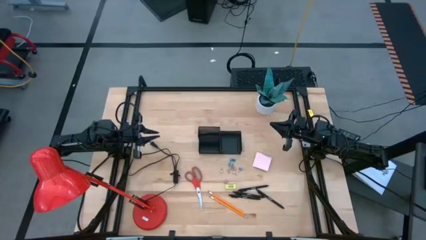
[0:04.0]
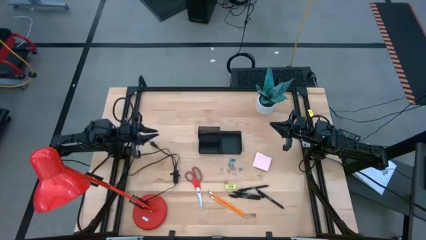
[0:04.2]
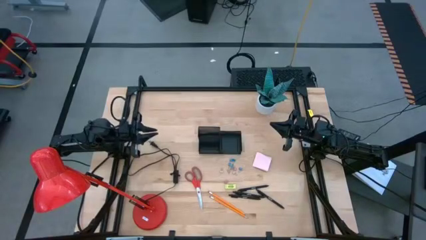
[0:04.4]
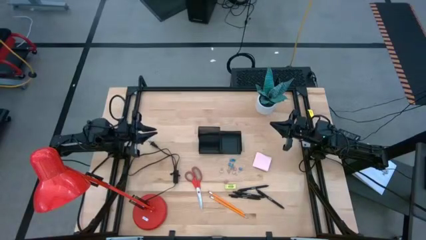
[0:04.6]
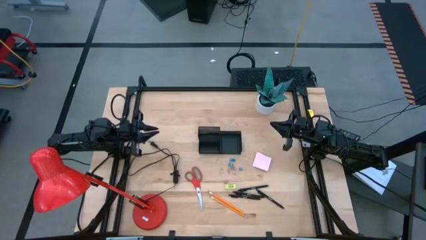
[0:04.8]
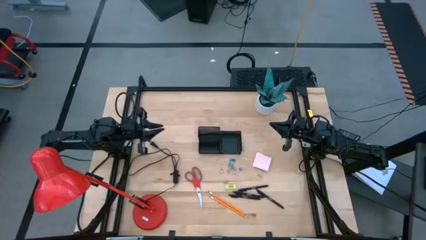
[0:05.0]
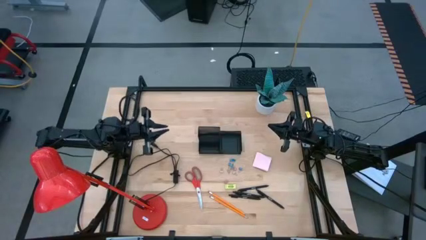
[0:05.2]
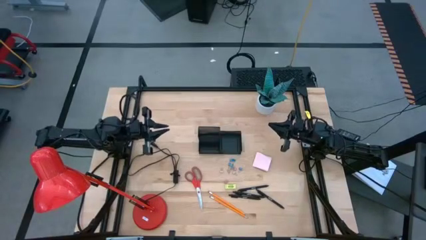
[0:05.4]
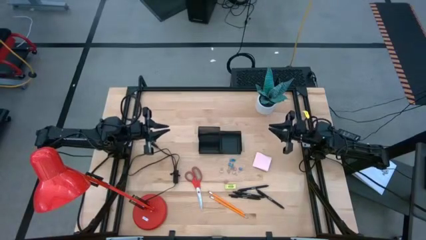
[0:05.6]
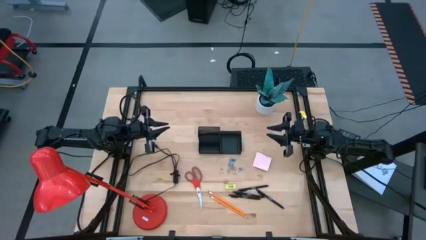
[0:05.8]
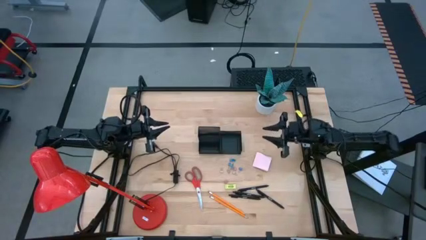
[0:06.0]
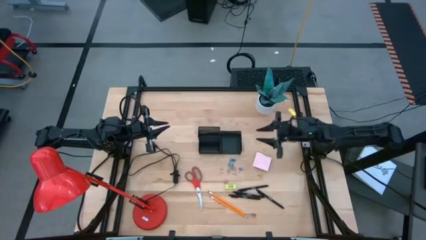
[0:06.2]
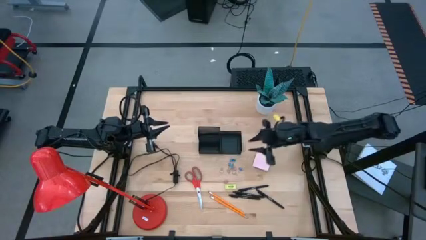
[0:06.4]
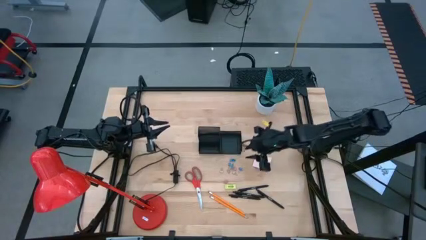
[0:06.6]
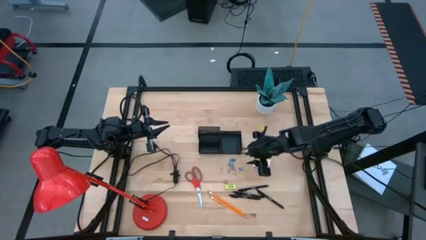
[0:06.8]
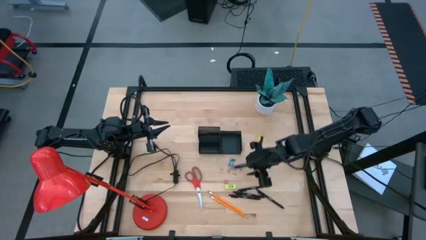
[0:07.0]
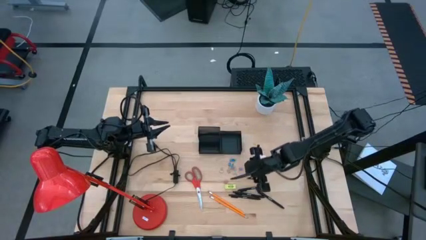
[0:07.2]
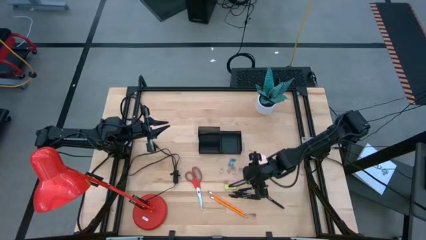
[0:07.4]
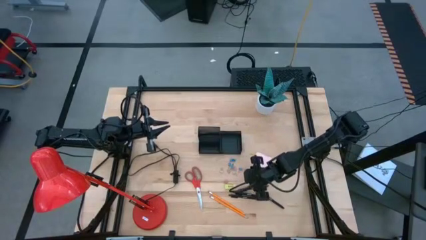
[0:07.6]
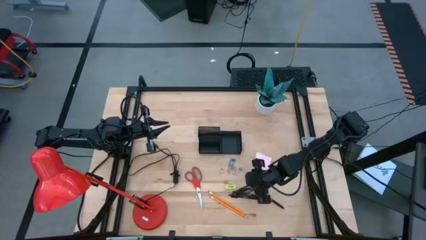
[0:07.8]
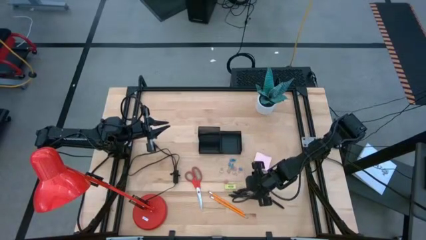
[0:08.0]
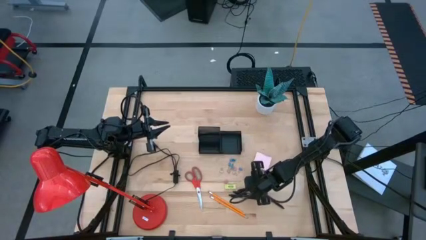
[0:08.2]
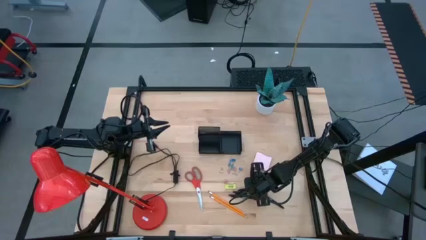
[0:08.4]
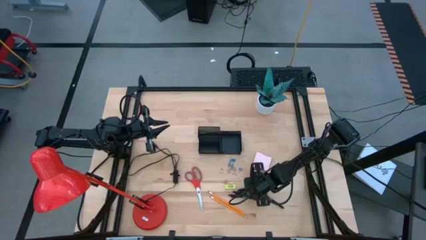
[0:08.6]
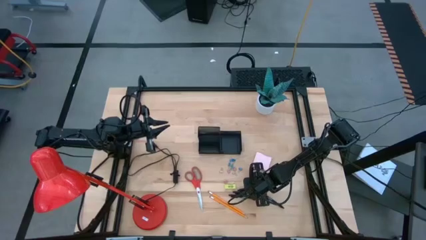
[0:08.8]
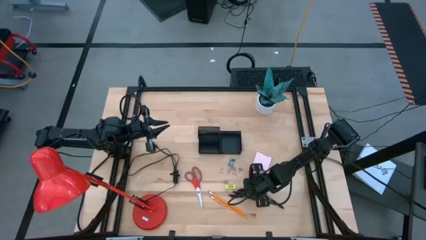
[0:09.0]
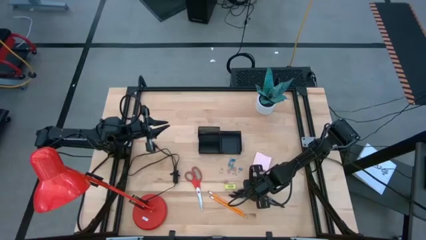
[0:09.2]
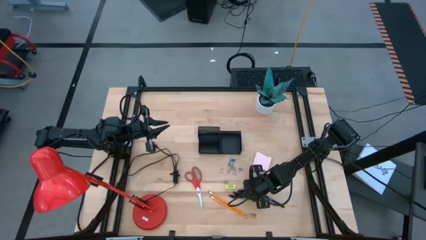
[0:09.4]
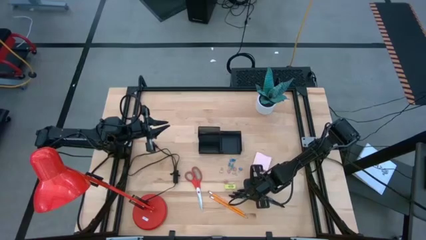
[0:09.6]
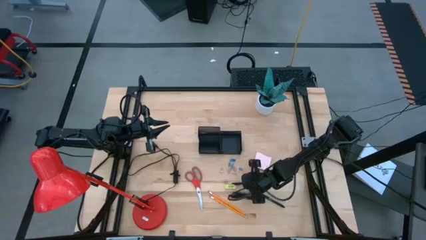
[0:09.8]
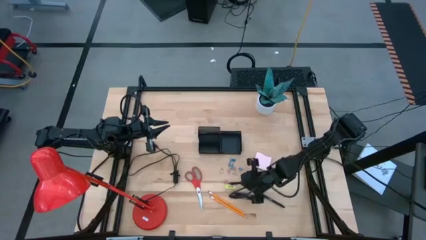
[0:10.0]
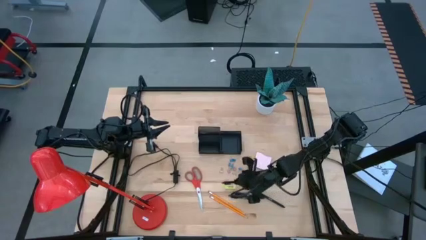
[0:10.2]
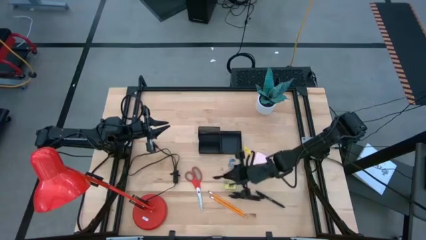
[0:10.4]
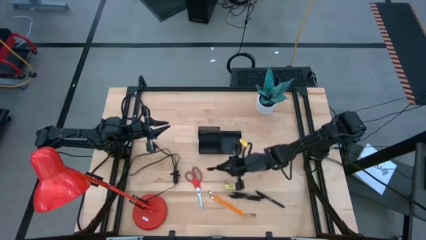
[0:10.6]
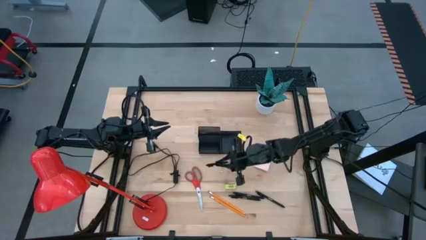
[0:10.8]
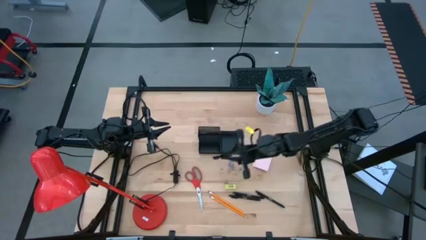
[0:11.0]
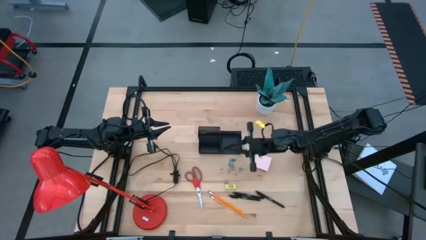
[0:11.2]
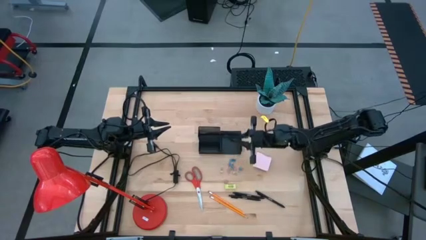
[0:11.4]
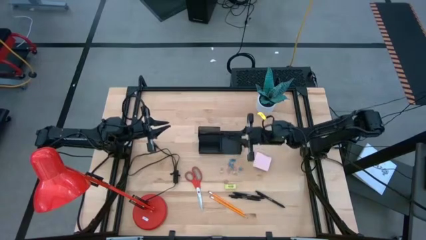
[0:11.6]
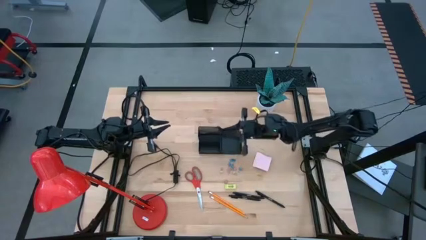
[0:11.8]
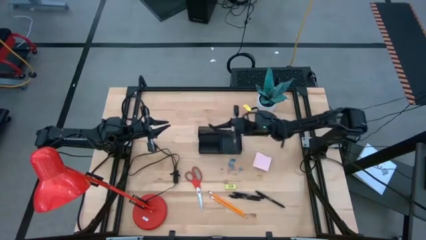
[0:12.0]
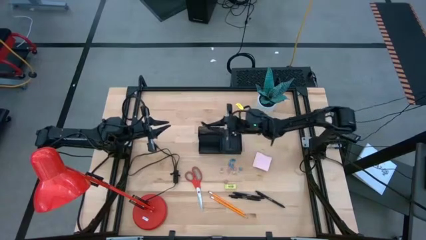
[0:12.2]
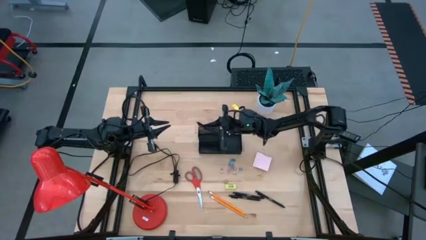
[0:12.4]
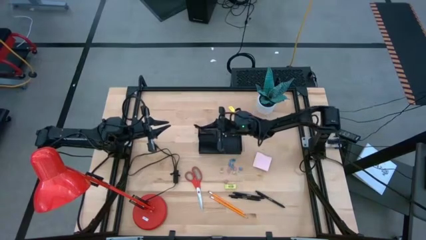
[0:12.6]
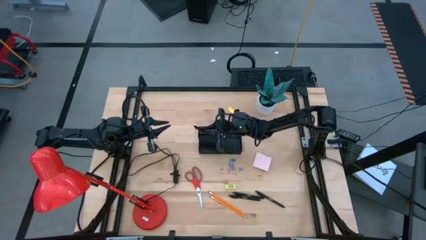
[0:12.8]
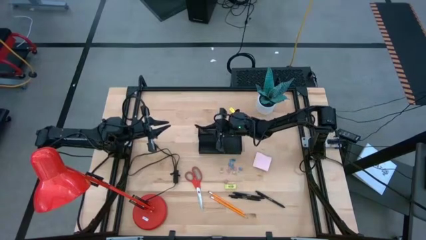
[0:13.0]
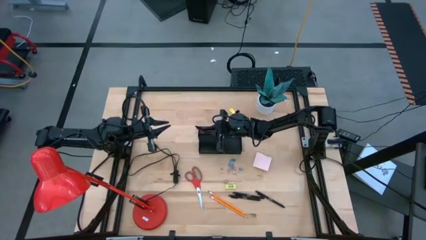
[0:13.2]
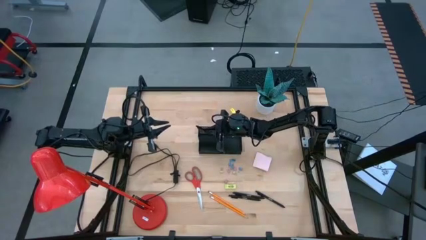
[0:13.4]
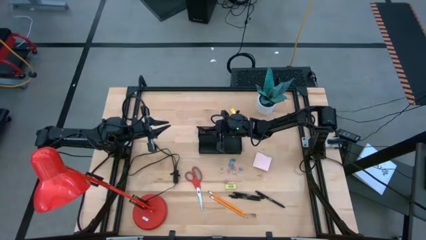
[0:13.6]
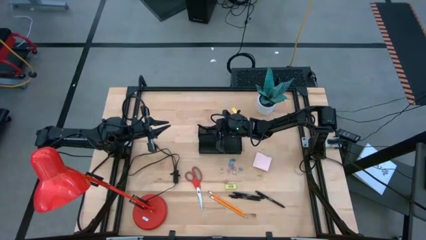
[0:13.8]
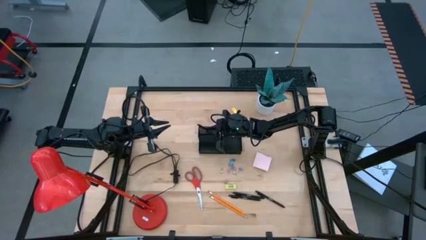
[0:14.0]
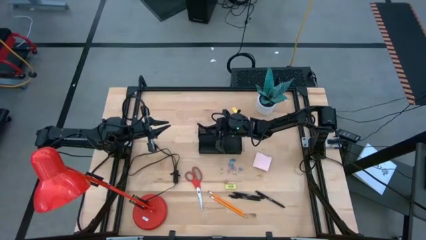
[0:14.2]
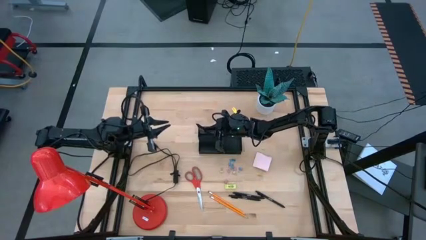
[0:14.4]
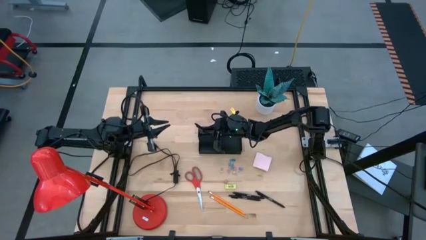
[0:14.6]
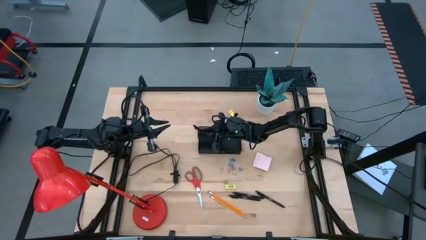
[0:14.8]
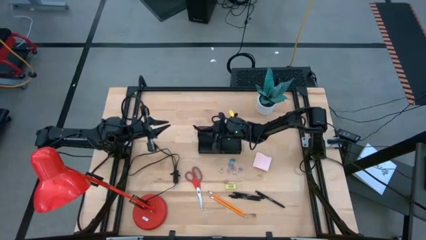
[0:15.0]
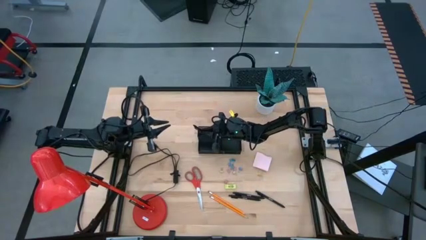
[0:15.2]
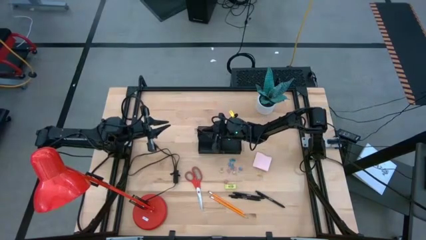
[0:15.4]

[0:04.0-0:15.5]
Task: Pick and place office supplies into organizer
Put the black pen into the black desk organizer
